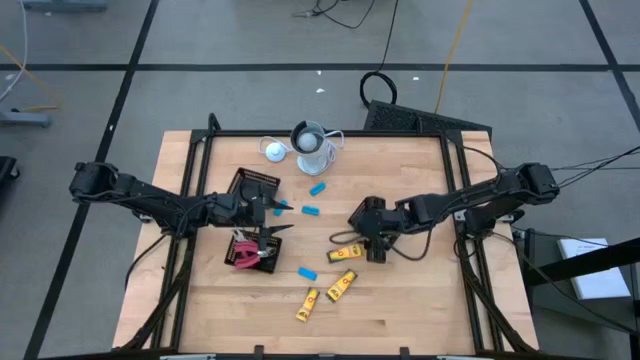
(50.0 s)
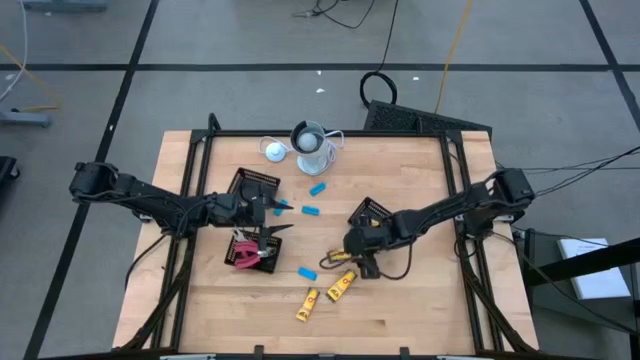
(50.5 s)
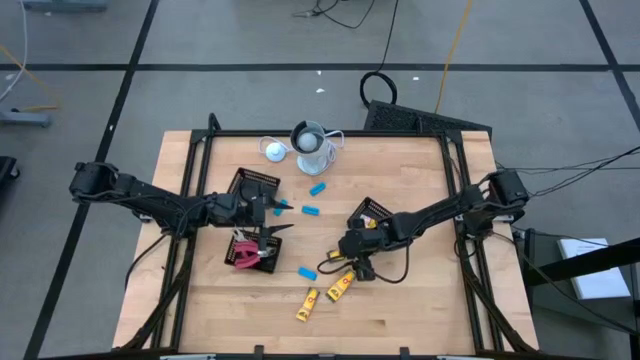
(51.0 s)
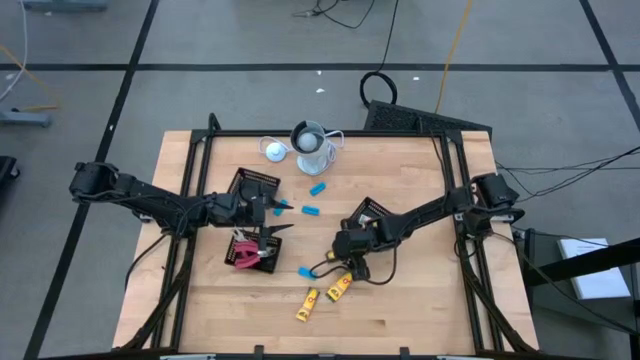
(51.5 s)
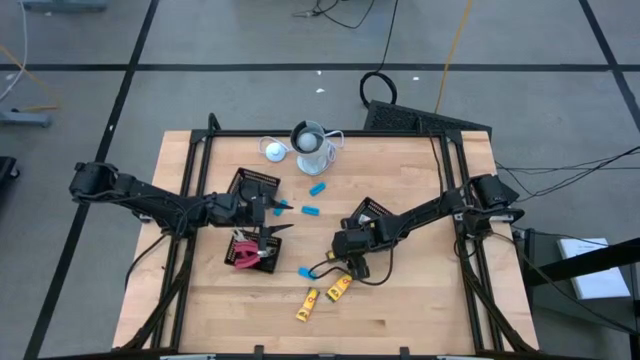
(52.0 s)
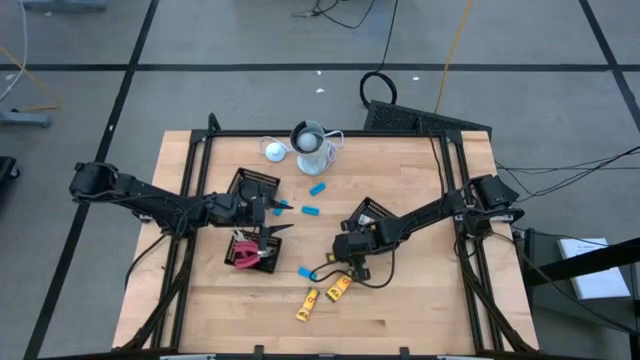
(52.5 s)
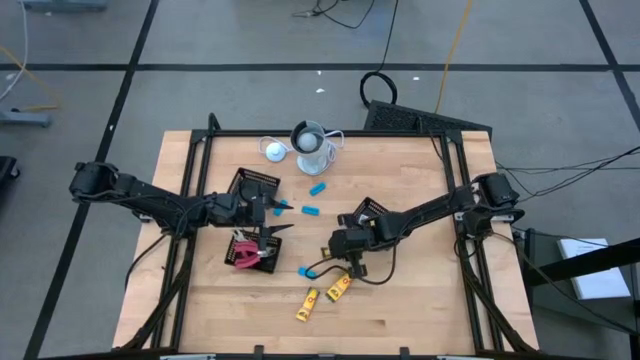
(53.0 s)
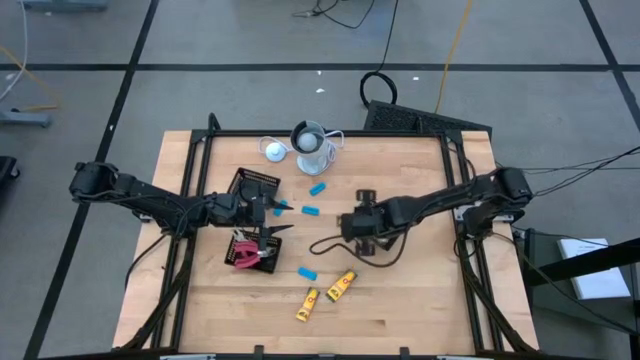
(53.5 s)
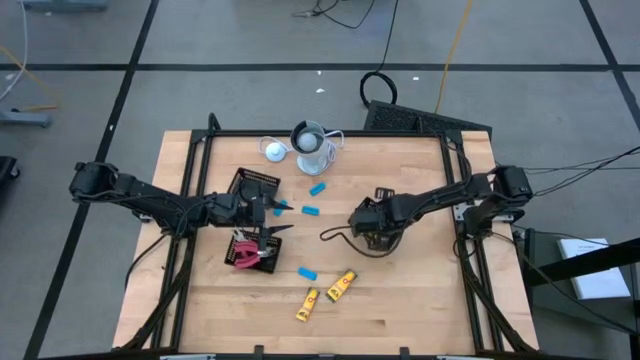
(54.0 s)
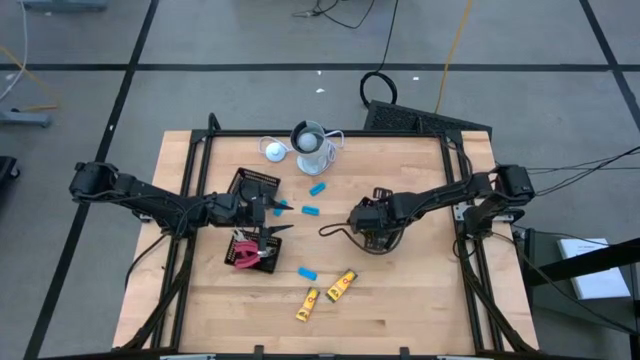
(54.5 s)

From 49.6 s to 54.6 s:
Task: Pick & Place School Supplies
Put the yellow crayon box into the bottom right black bin

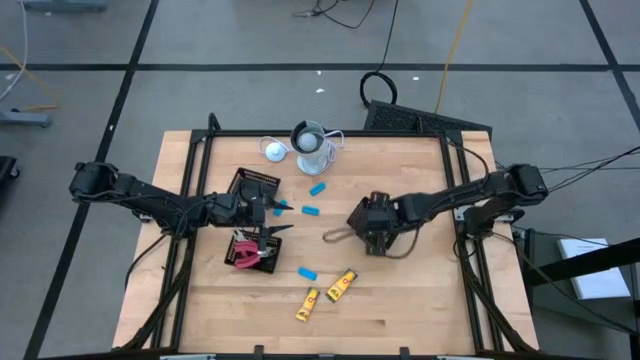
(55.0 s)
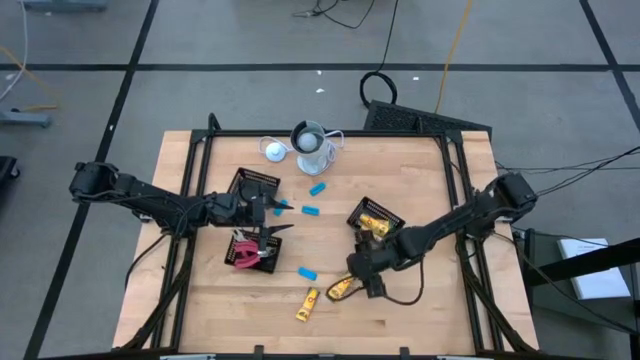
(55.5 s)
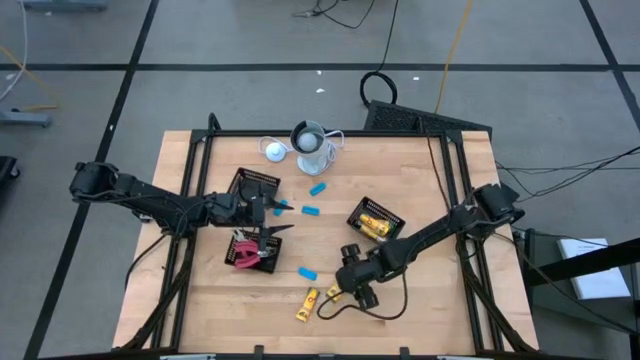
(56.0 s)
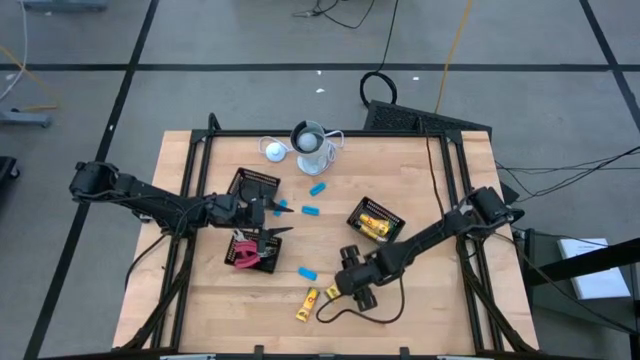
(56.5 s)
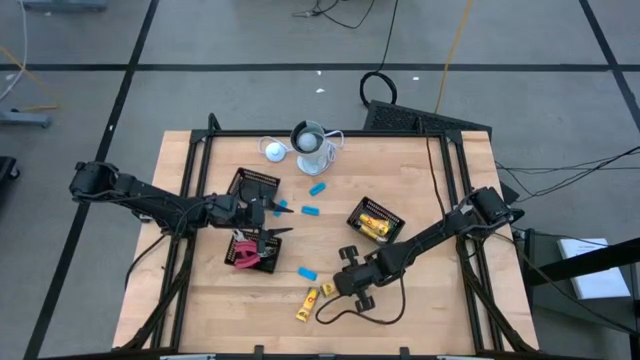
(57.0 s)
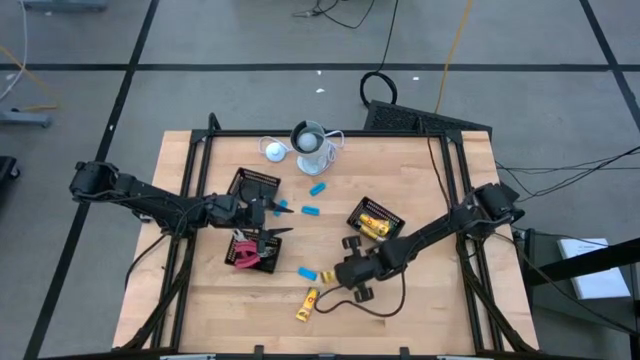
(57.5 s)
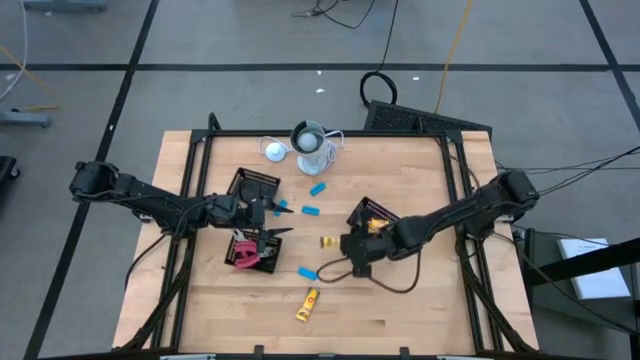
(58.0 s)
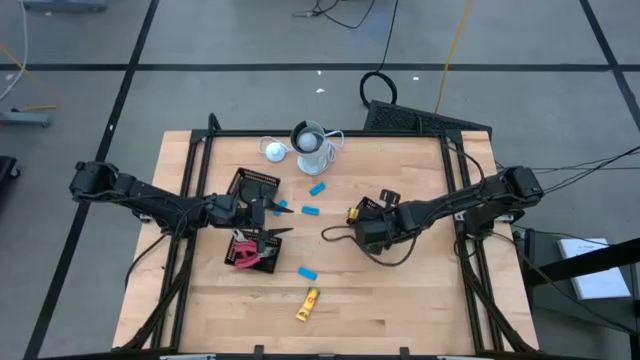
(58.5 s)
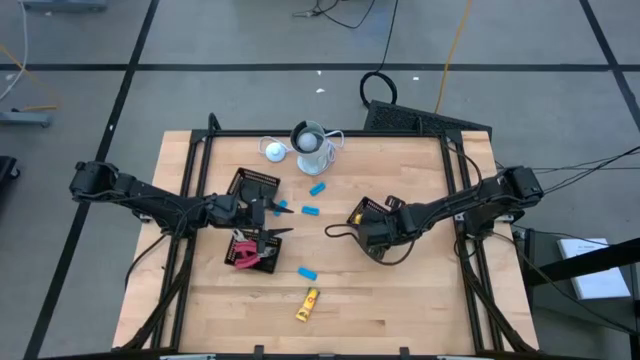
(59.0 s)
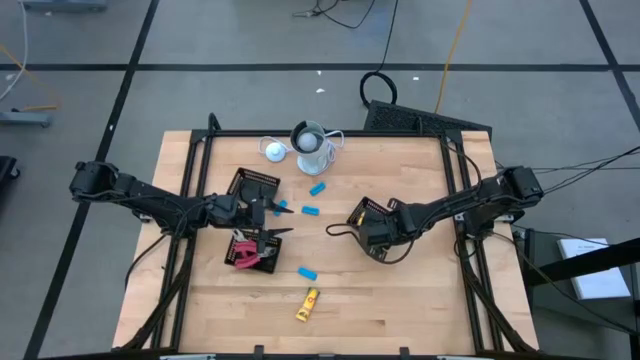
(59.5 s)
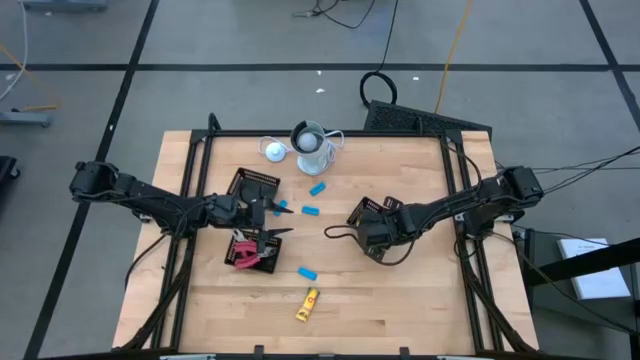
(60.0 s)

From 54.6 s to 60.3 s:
Put the yellow crayon box into the bottom right black bin

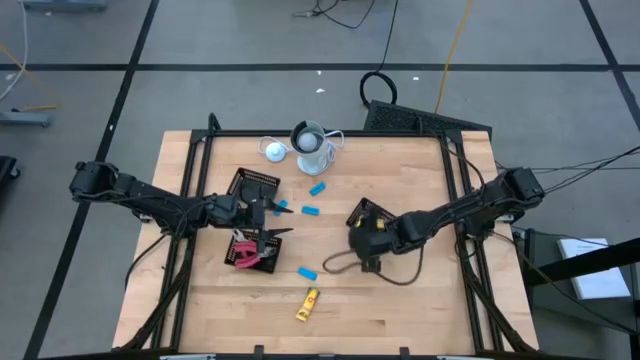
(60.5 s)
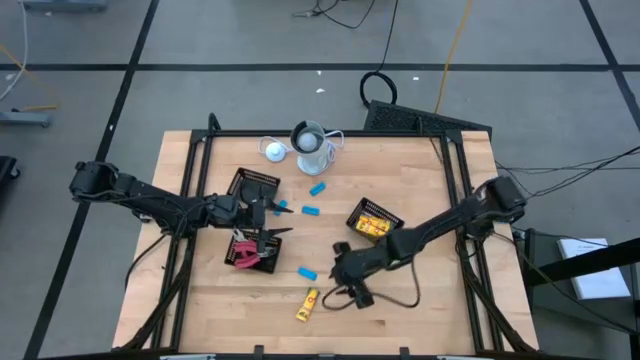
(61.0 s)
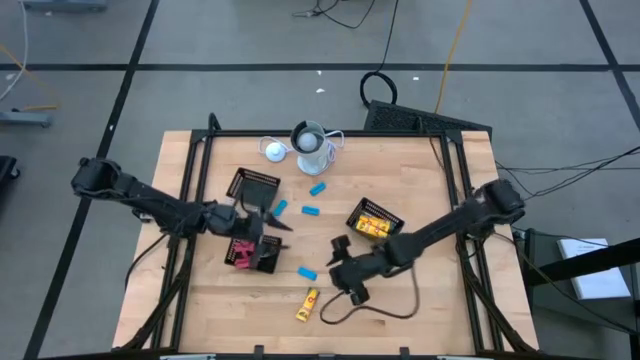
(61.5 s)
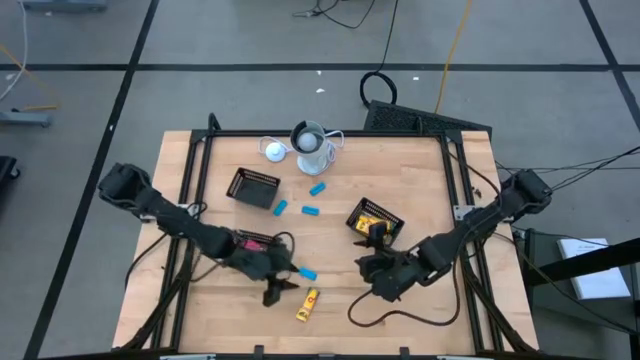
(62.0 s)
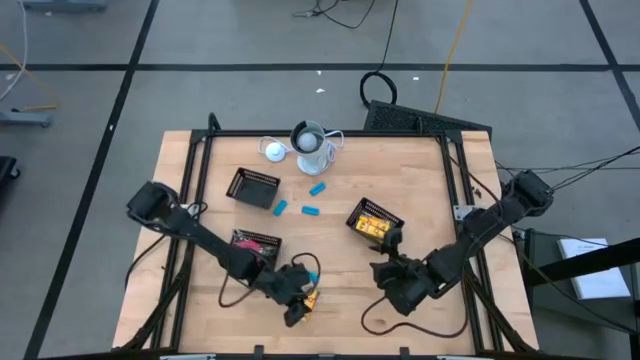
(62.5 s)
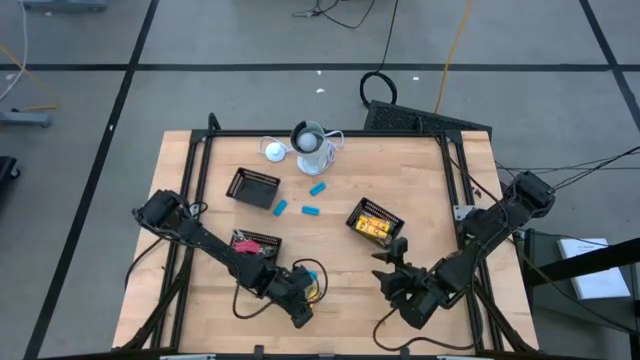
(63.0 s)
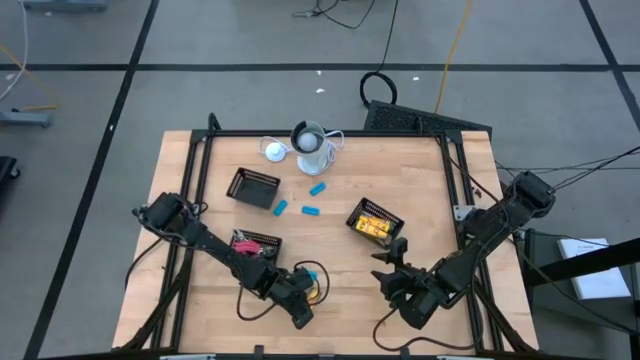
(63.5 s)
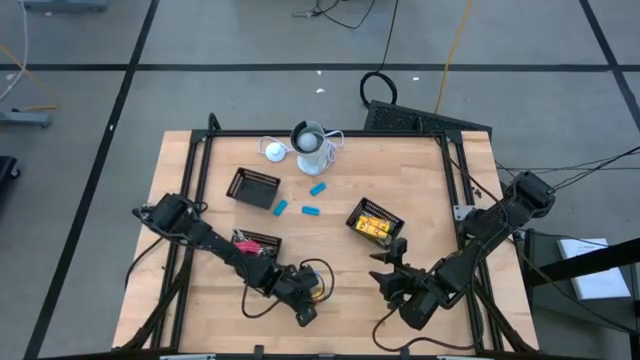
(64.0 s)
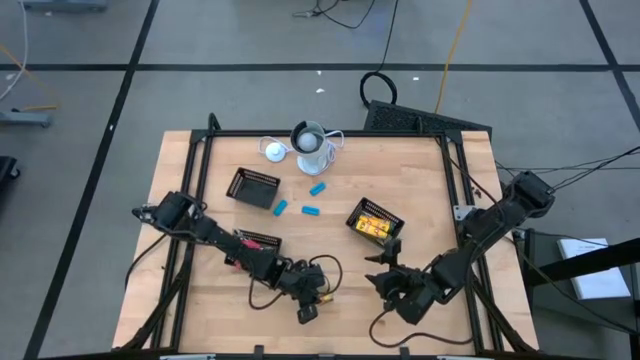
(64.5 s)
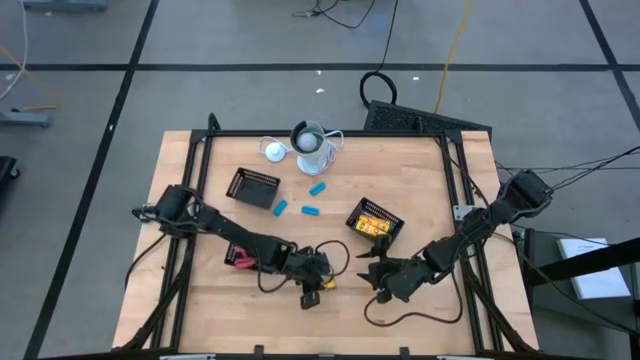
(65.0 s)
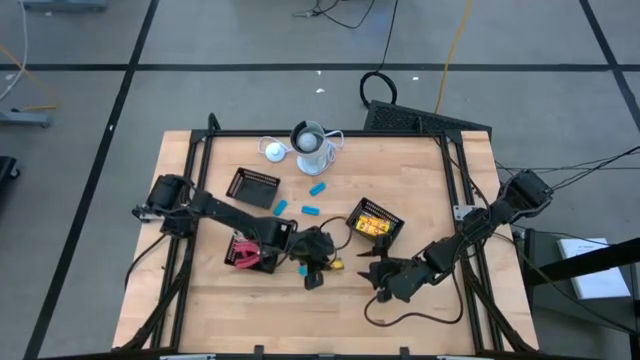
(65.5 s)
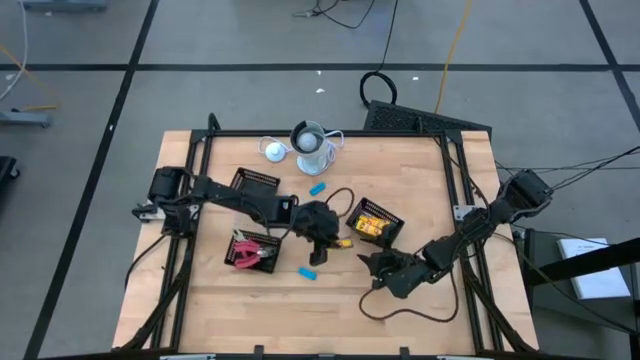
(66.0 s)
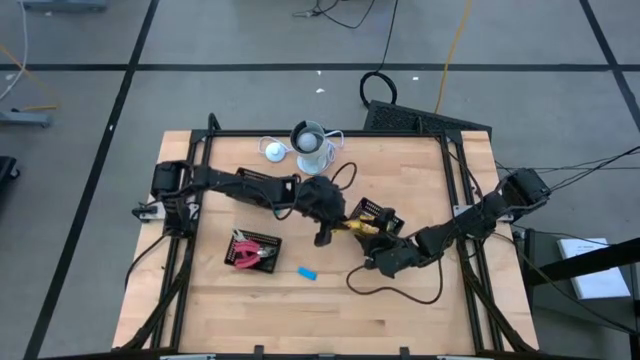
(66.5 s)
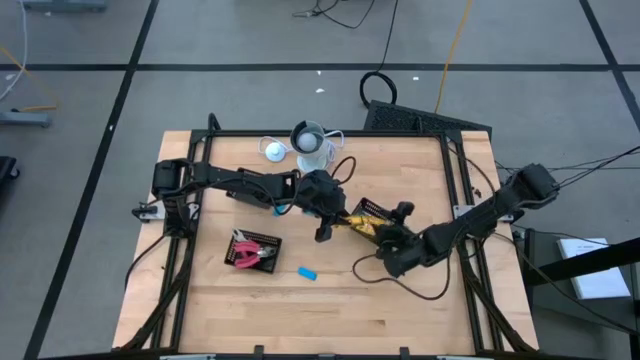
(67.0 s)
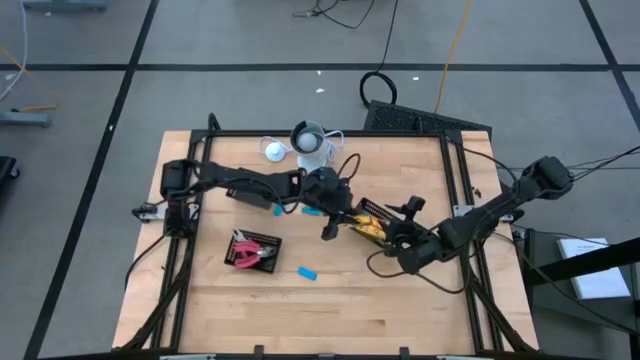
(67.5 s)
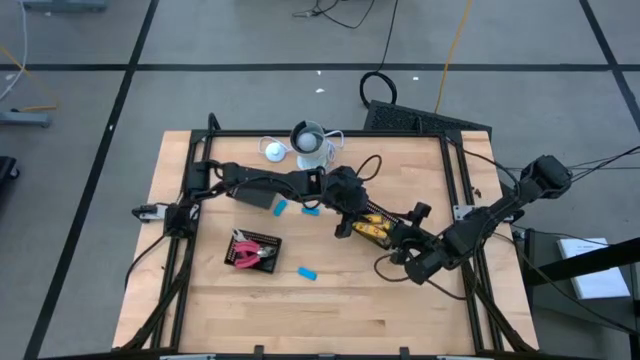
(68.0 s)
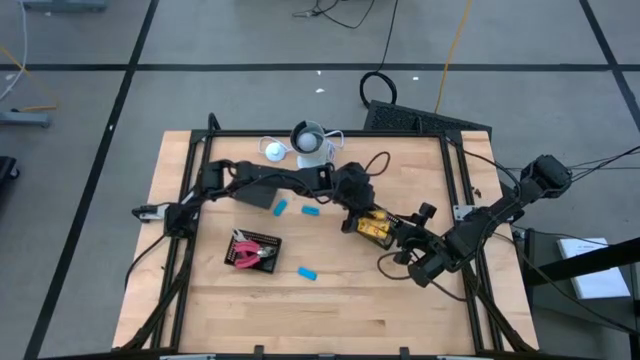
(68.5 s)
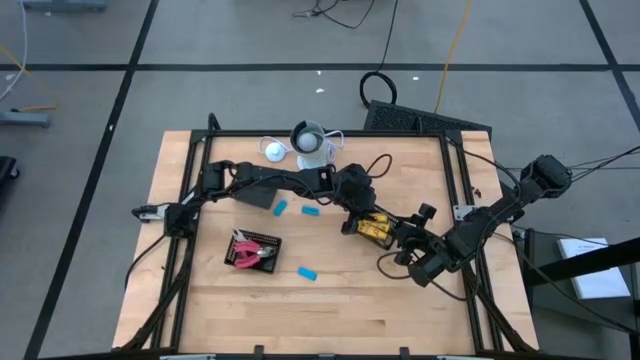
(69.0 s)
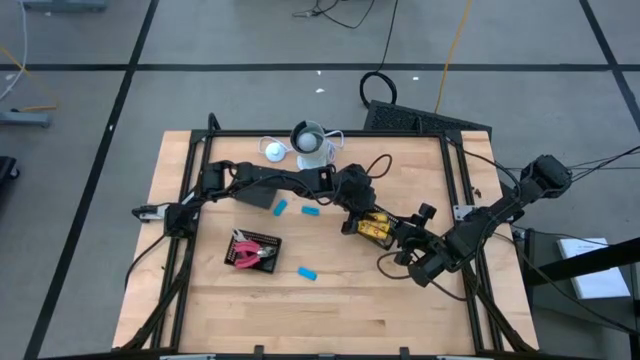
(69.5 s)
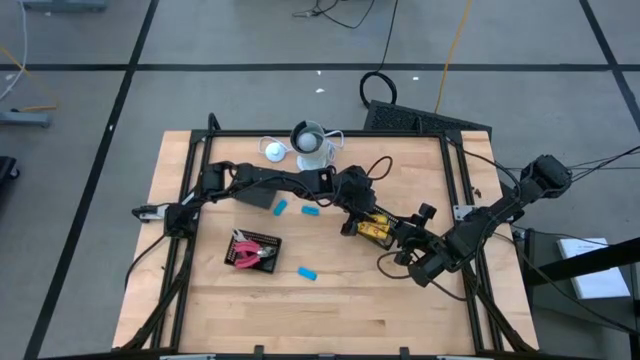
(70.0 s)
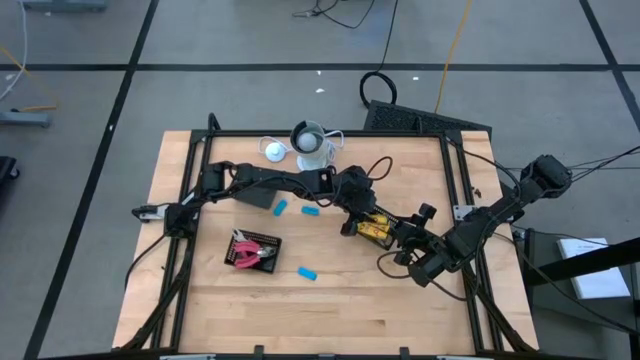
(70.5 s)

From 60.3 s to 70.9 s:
Put the yellow crayon box into the bottom right black bin

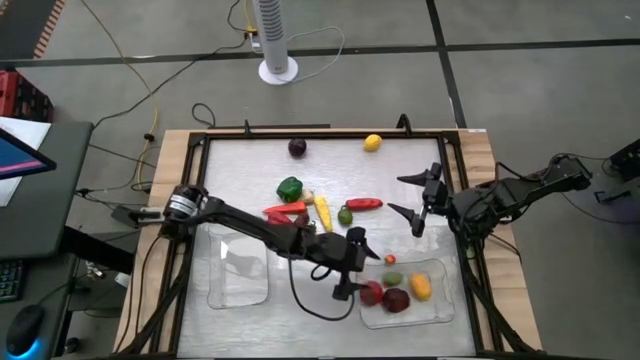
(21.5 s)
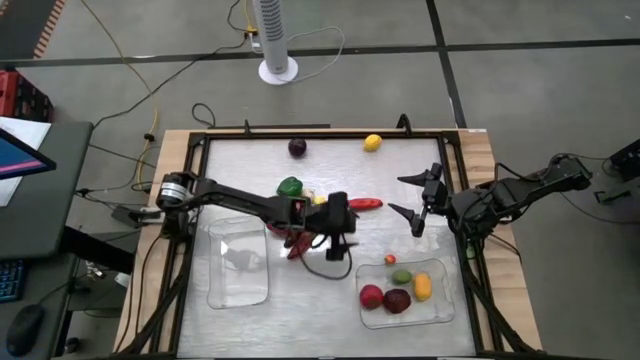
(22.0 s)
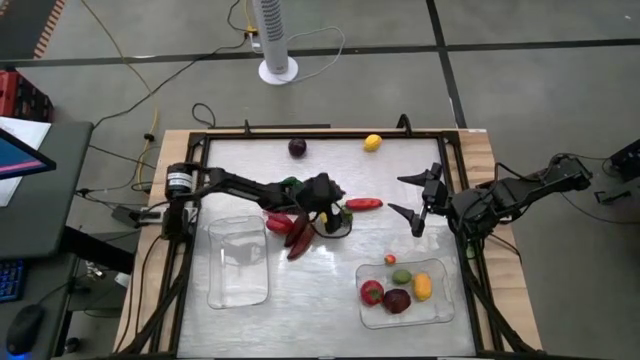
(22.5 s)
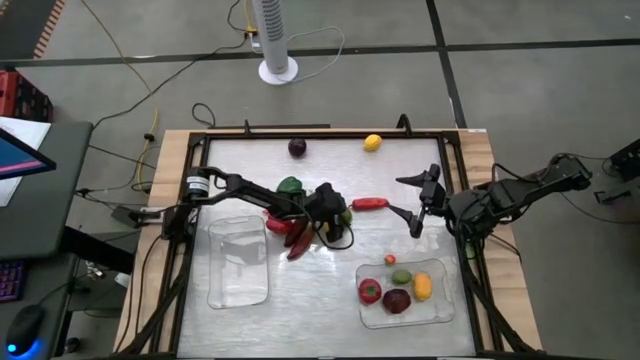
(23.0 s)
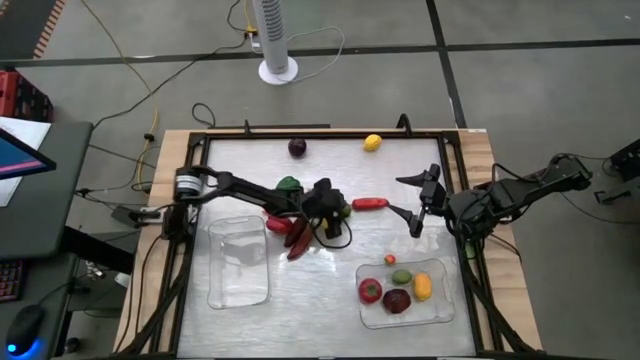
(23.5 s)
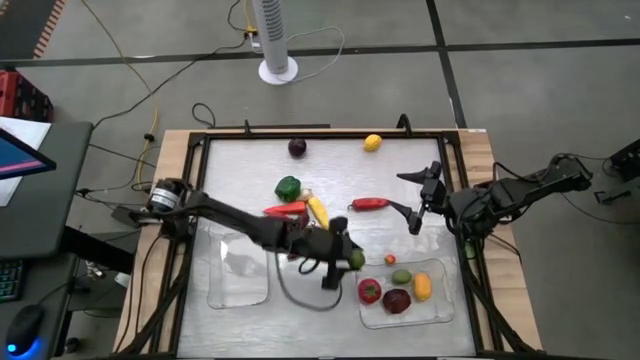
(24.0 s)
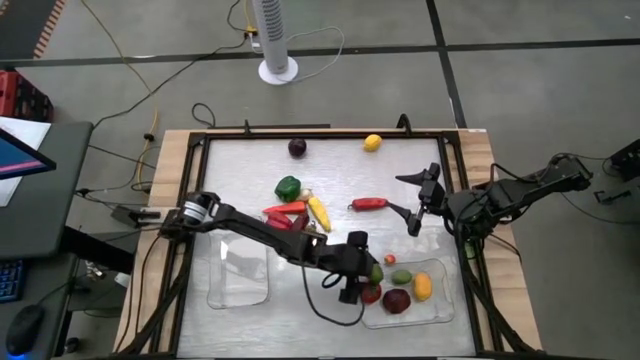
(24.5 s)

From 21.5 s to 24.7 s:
Task: Sort produce into baskets
Put the lime into the right transparent bin
